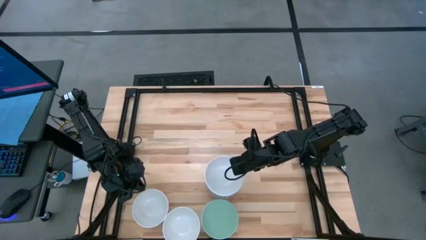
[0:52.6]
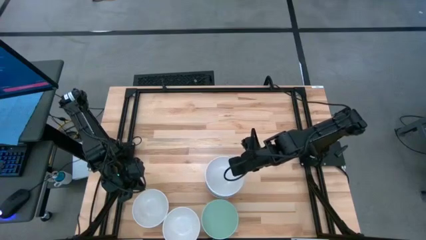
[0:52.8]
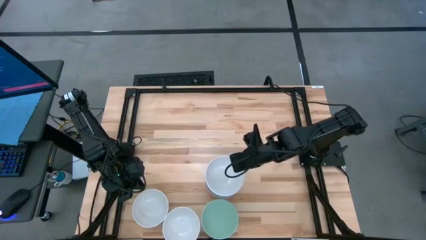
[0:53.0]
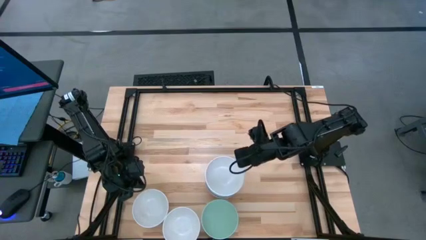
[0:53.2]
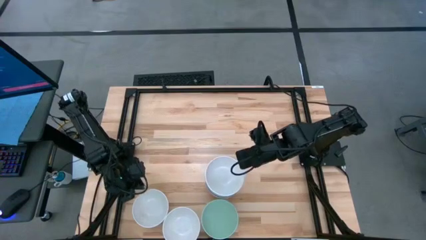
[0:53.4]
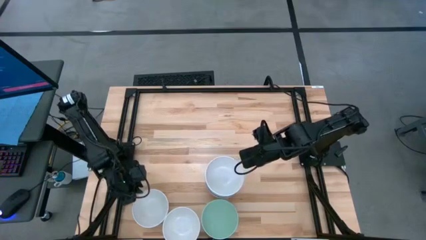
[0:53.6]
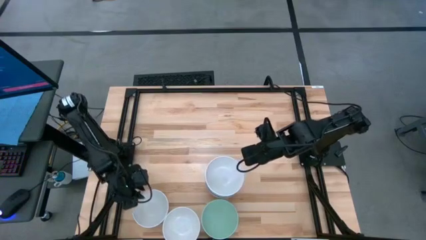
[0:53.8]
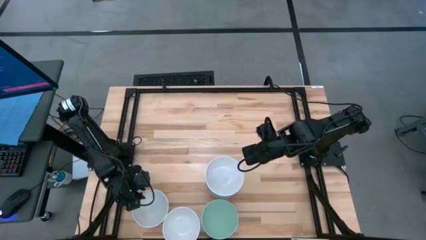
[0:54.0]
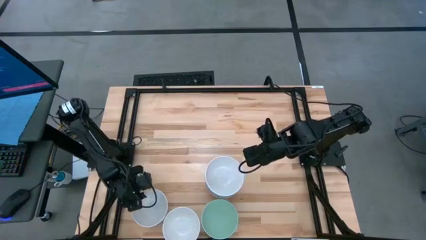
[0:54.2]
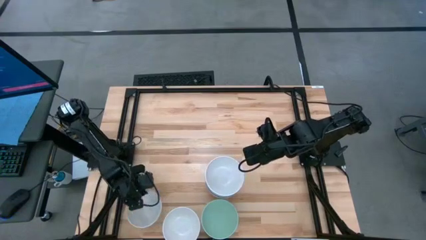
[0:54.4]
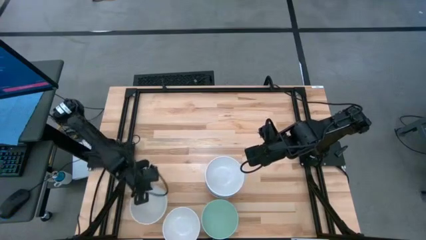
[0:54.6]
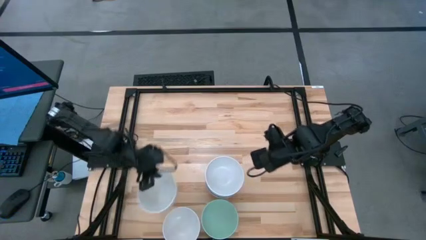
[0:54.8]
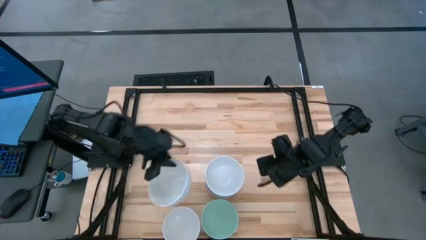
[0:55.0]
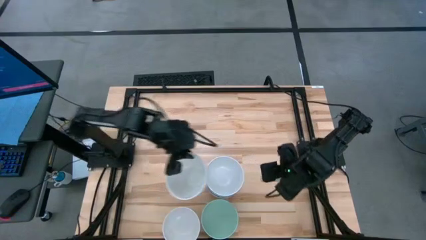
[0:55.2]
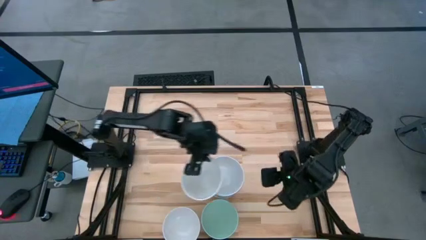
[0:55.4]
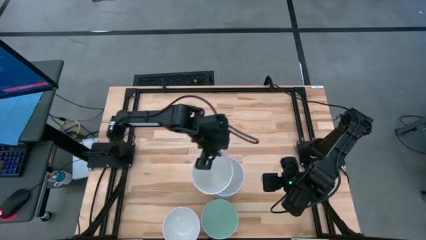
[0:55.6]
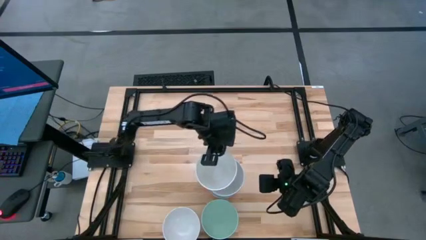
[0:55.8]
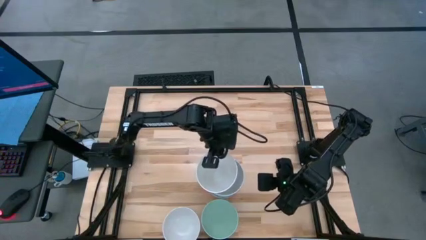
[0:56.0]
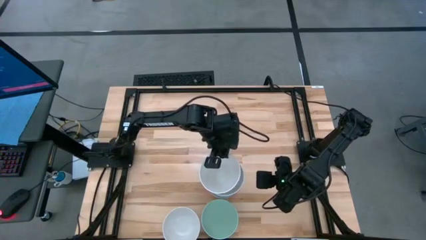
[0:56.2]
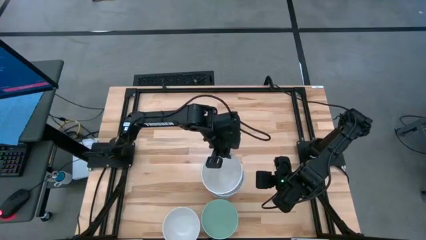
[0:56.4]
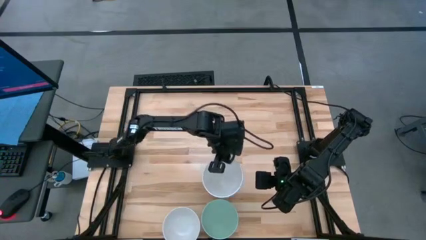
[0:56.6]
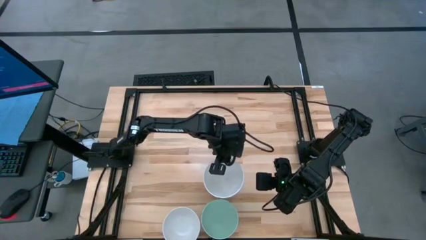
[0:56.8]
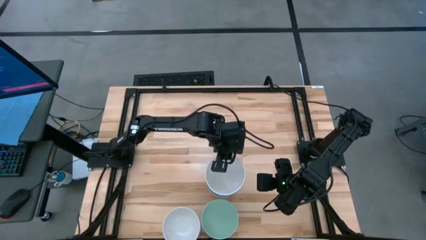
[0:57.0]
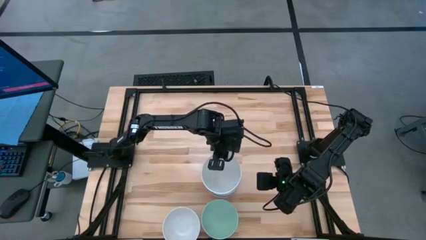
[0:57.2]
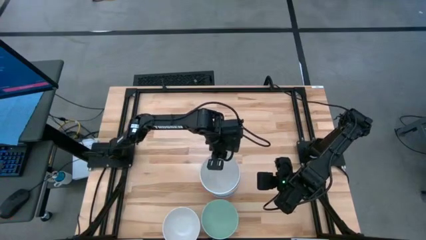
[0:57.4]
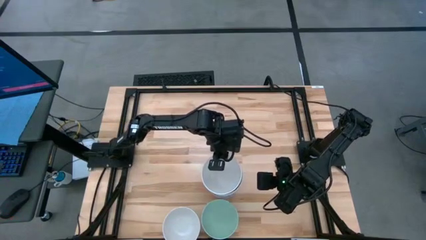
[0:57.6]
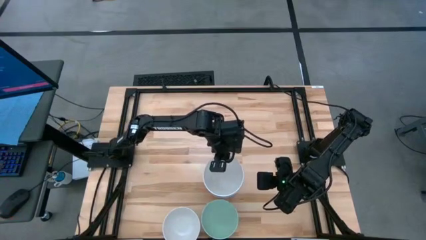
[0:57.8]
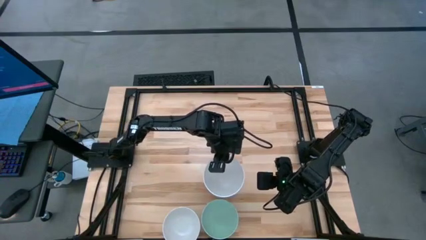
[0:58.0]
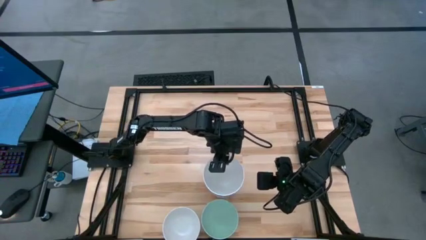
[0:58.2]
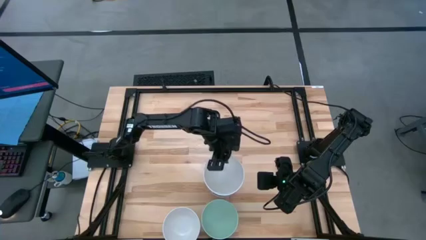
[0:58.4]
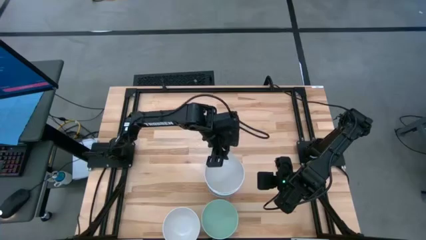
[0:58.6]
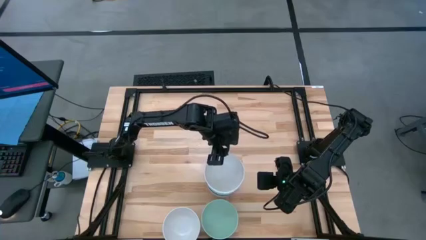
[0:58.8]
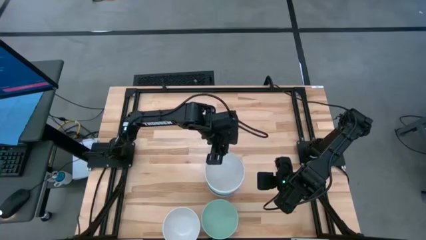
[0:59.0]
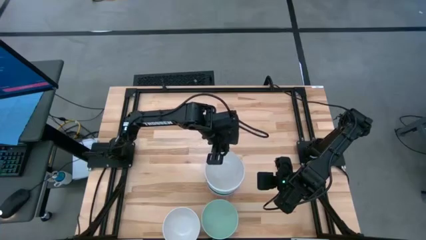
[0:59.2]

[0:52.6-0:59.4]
Task: Nest bowls inside each other
Stack the white bowl on the white bowl

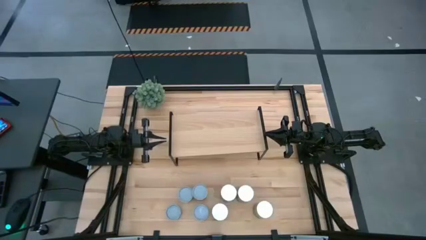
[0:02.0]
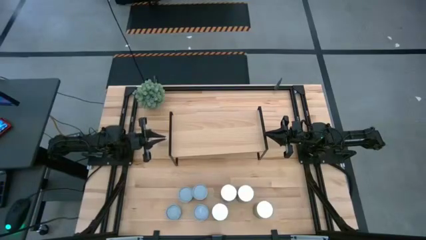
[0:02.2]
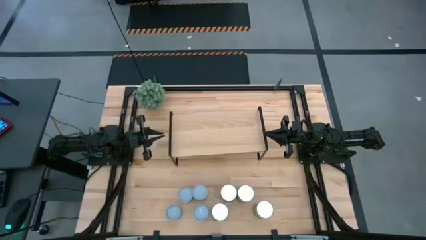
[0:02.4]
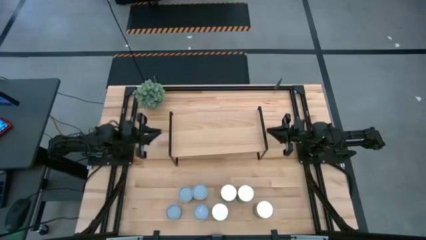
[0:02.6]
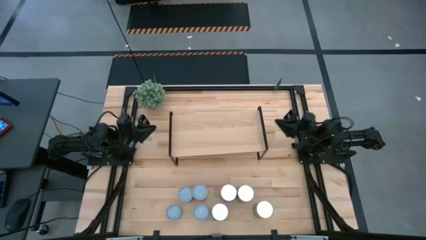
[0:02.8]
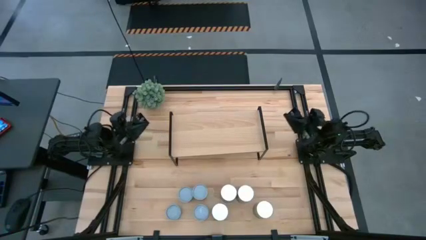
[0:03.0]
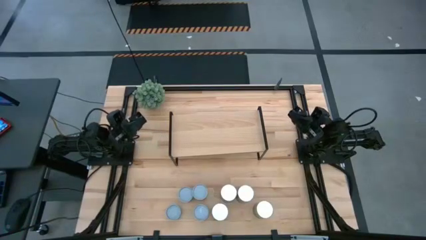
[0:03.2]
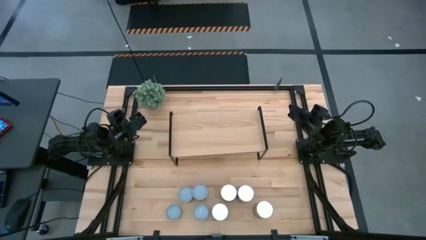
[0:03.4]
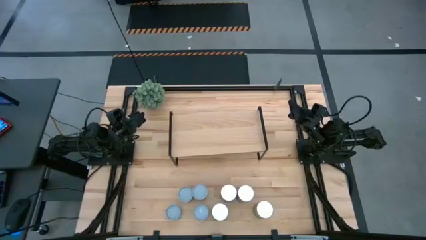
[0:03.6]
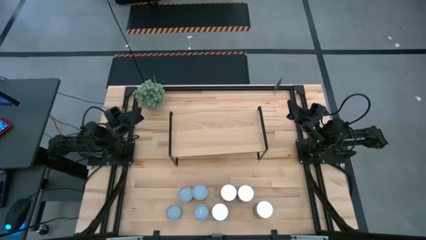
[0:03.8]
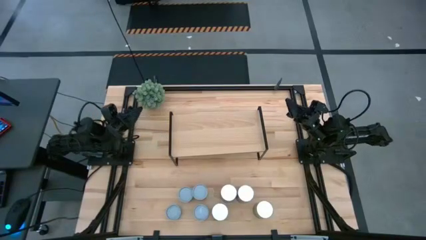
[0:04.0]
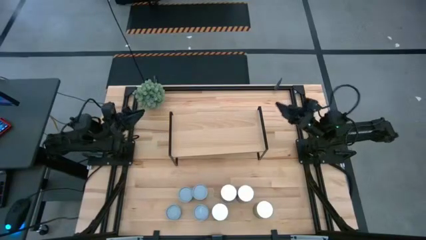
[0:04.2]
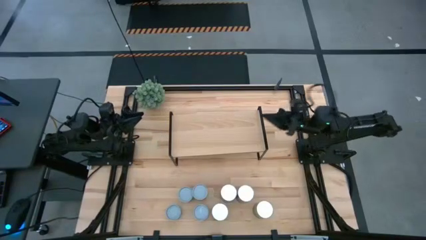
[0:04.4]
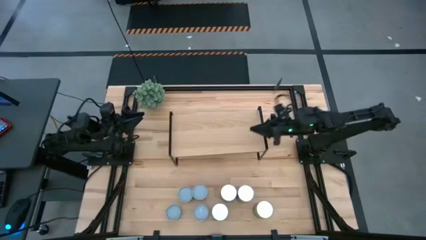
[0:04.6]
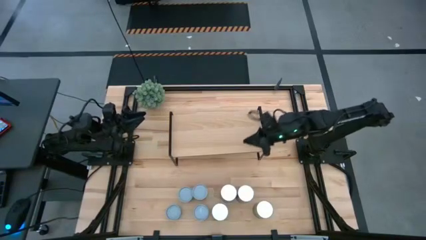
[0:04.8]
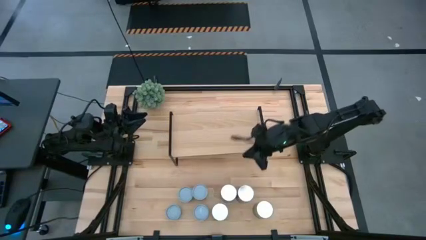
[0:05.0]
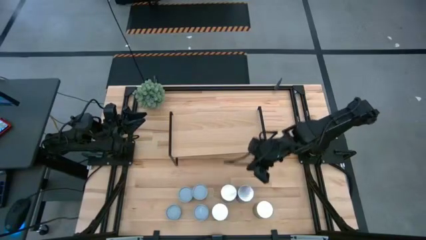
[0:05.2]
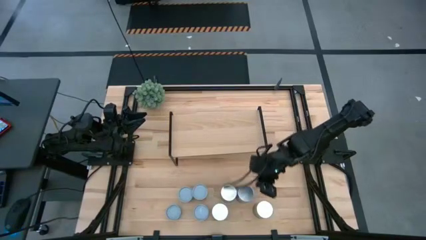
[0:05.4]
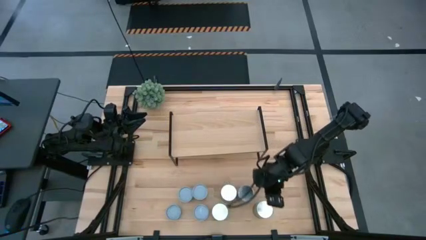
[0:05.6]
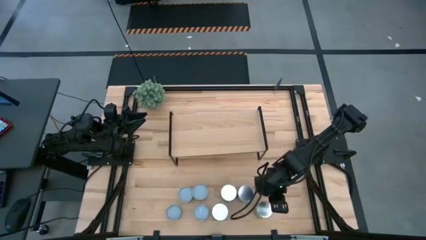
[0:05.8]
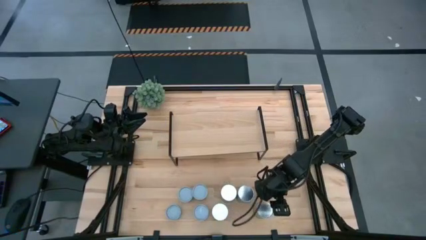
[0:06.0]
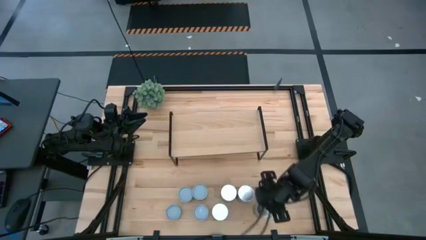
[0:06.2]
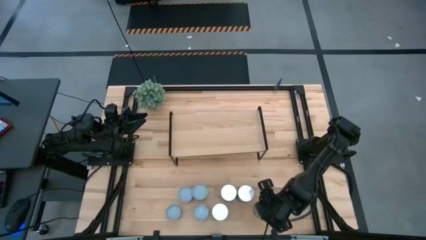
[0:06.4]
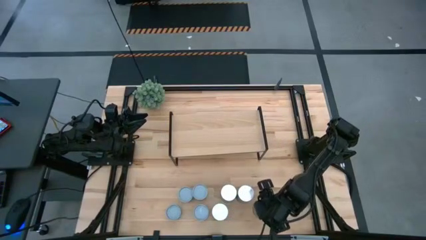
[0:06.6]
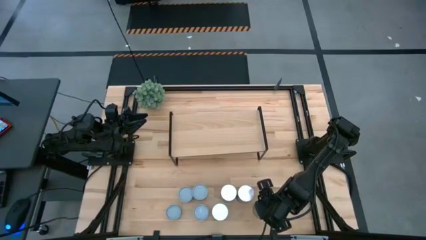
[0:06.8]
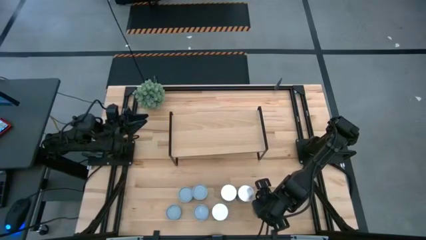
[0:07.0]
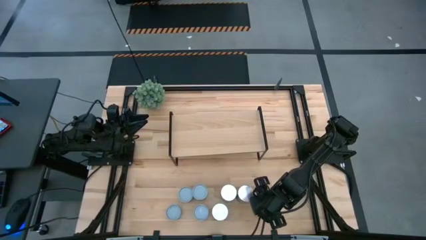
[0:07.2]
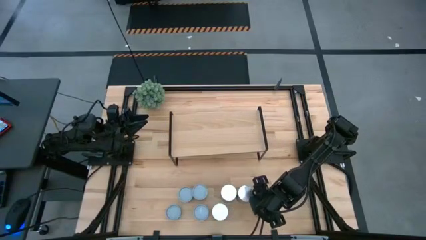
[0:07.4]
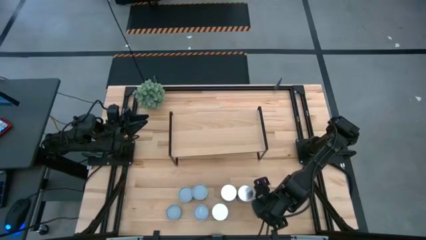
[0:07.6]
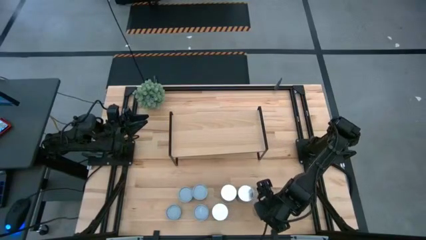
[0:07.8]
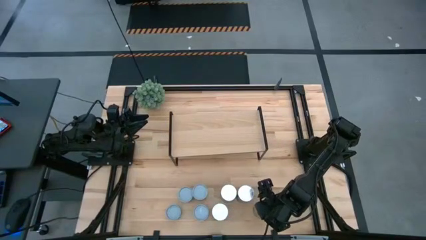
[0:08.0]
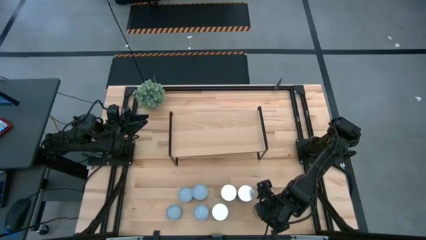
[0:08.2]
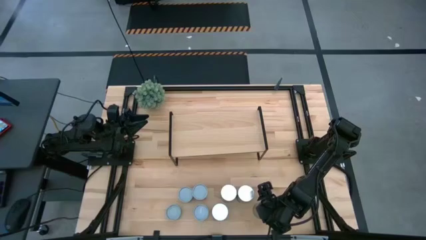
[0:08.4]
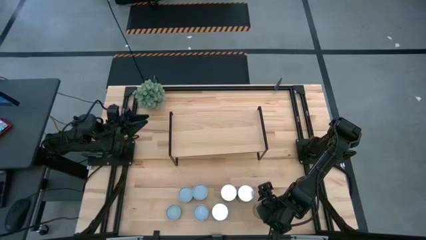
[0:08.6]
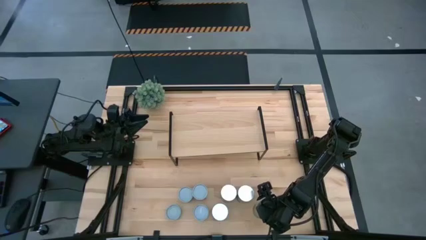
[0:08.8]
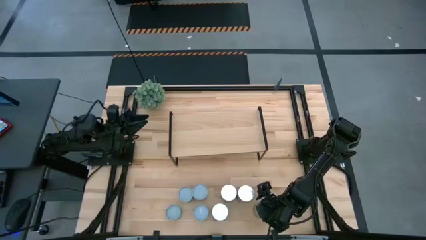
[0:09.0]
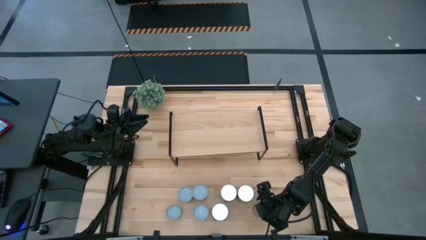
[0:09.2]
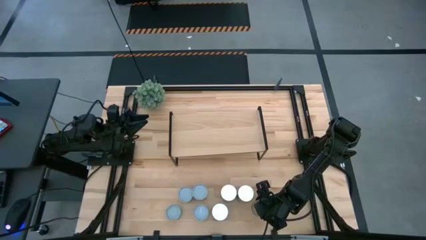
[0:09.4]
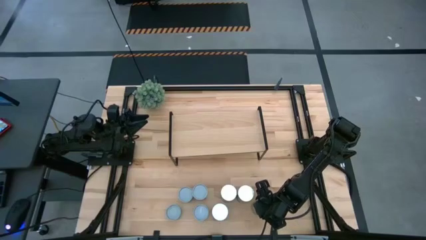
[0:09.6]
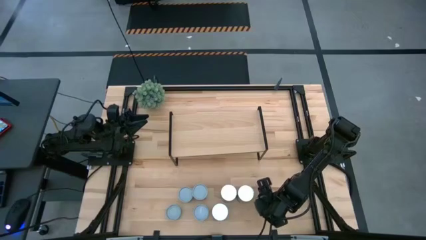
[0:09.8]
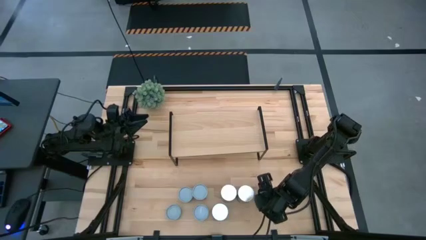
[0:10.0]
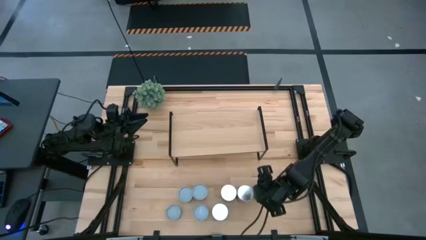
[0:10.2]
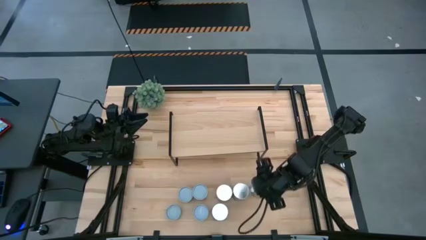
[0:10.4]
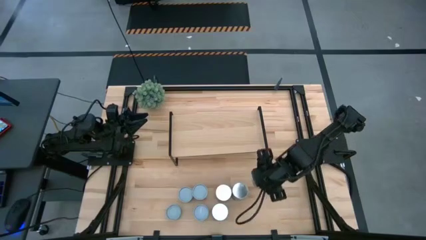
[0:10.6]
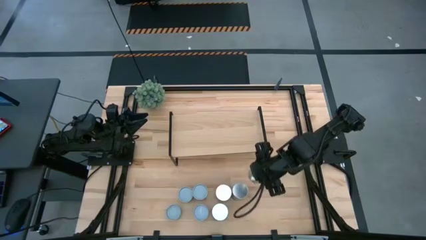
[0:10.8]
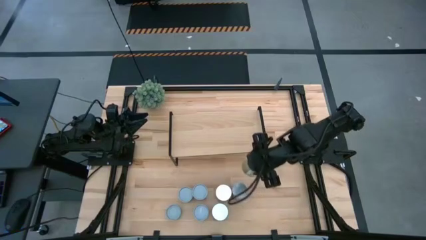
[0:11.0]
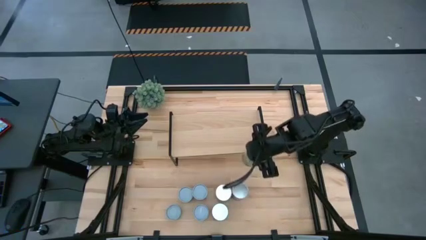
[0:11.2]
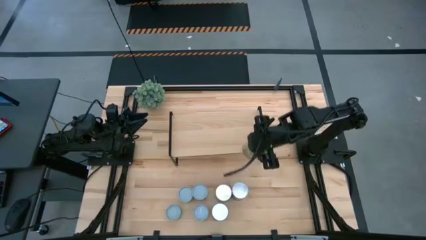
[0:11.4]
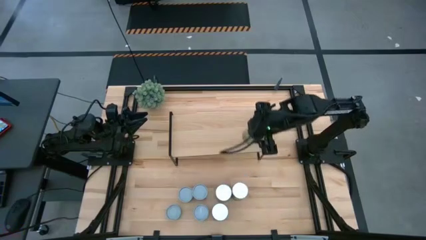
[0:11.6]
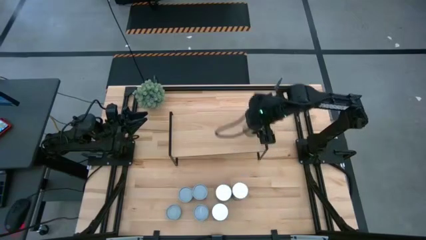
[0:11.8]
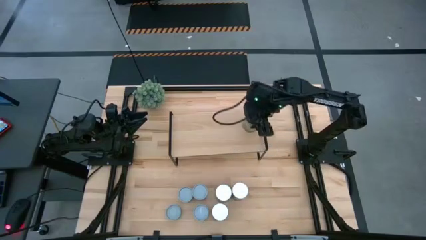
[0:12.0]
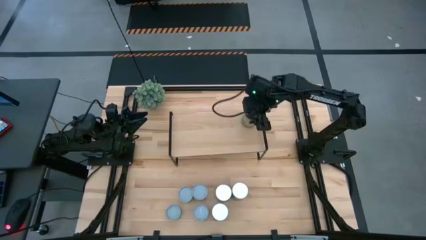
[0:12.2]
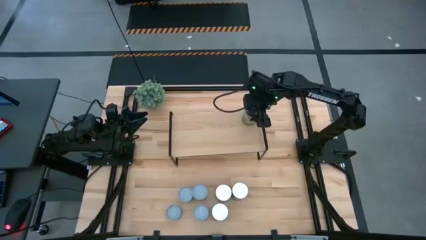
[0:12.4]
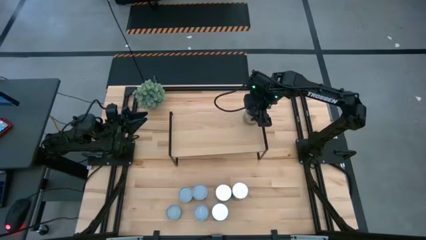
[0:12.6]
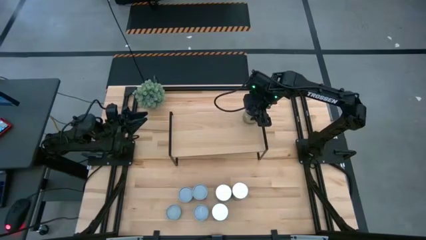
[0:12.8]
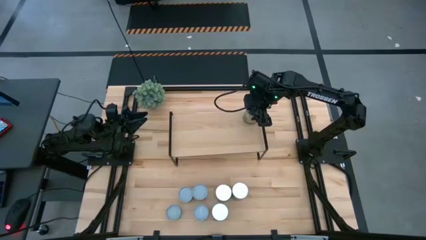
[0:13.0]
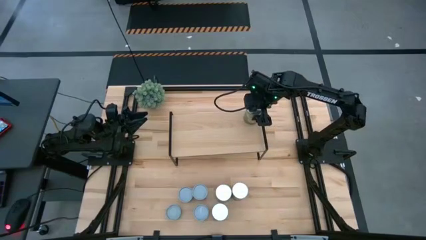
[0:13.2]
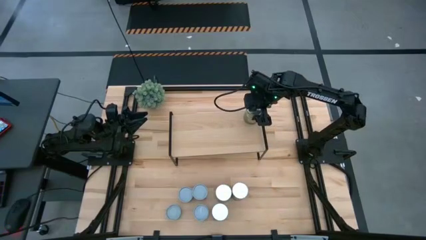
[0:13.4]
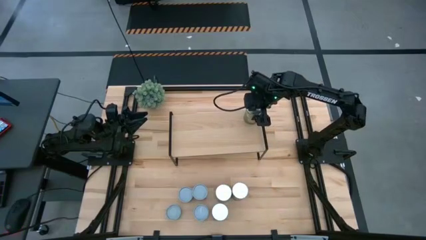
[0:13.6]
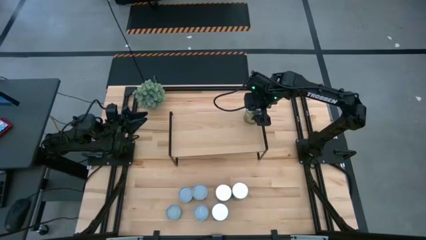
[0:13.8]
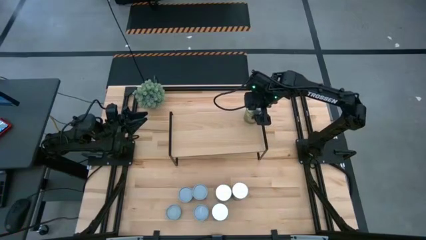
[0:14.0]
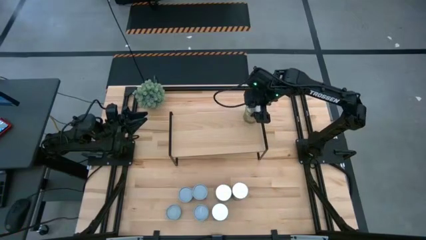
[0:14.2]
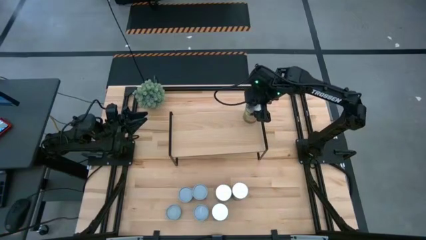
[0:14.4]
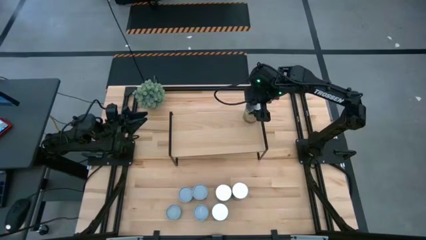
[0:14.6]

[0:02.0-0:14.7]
Task: Pick and place cans onto a shelf
Put the right green can on the shelf
